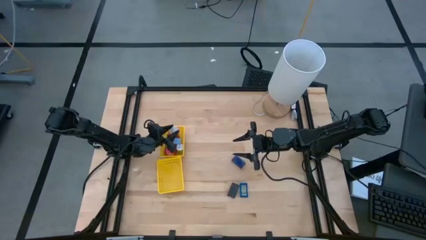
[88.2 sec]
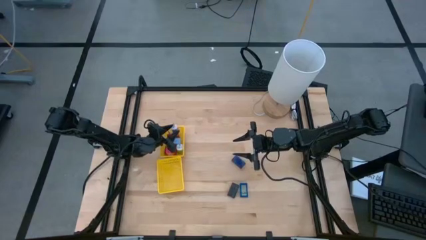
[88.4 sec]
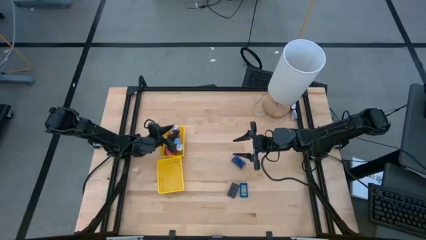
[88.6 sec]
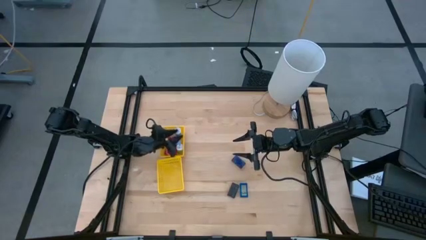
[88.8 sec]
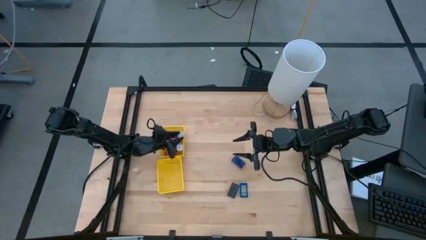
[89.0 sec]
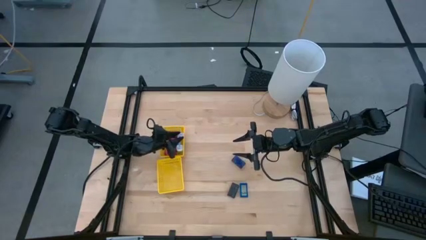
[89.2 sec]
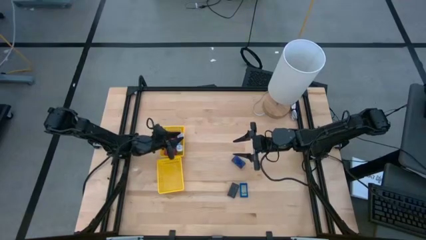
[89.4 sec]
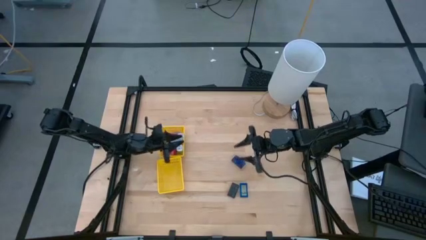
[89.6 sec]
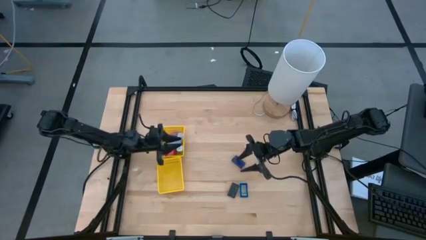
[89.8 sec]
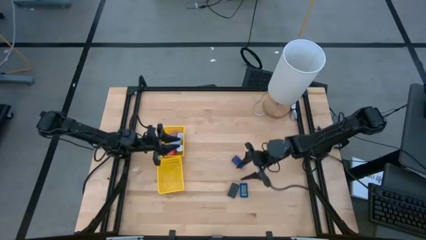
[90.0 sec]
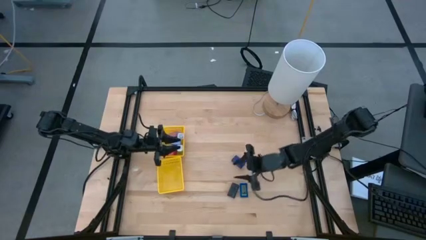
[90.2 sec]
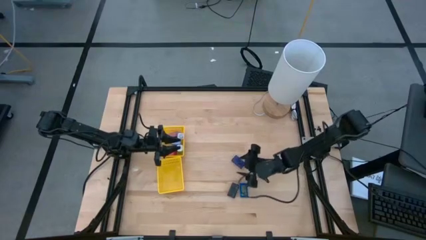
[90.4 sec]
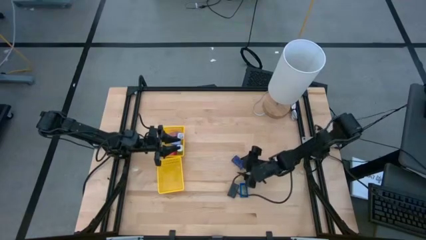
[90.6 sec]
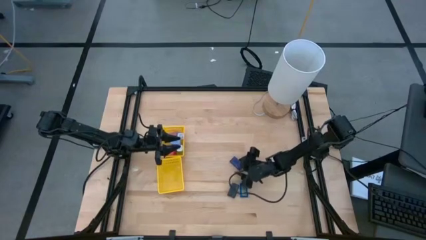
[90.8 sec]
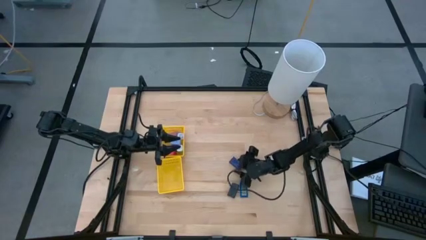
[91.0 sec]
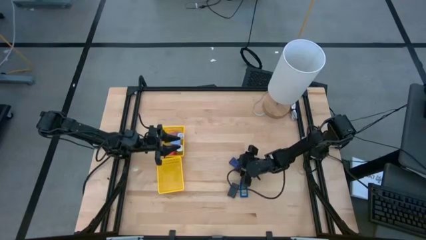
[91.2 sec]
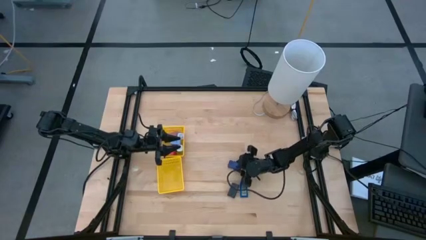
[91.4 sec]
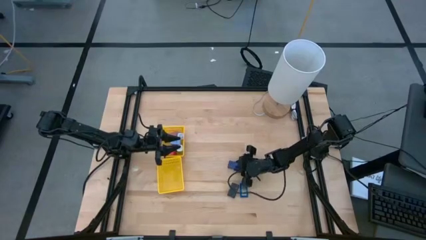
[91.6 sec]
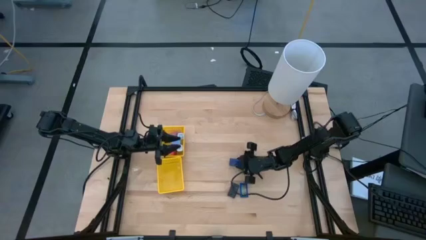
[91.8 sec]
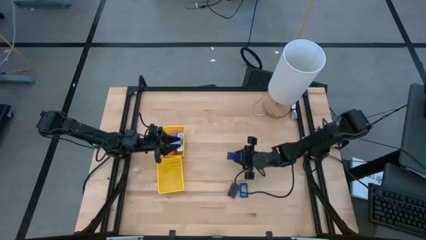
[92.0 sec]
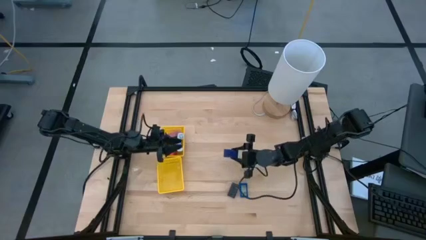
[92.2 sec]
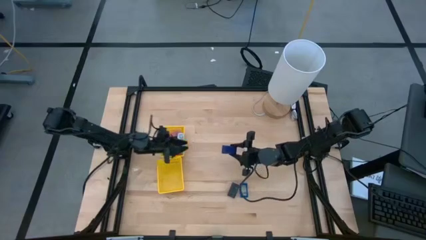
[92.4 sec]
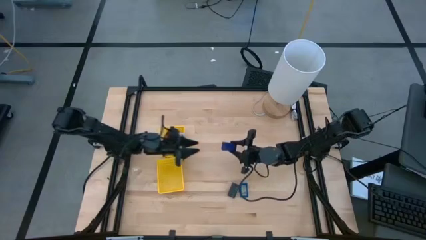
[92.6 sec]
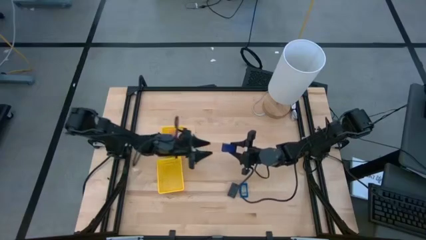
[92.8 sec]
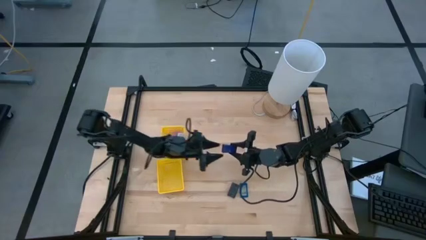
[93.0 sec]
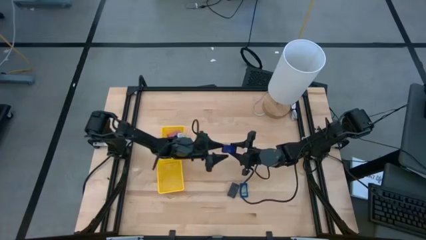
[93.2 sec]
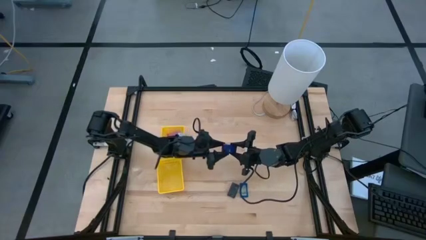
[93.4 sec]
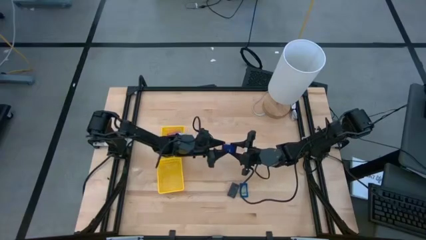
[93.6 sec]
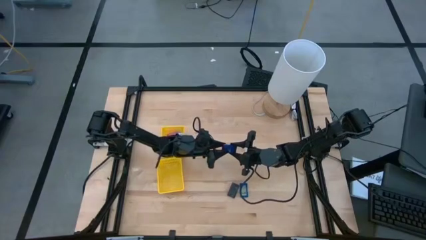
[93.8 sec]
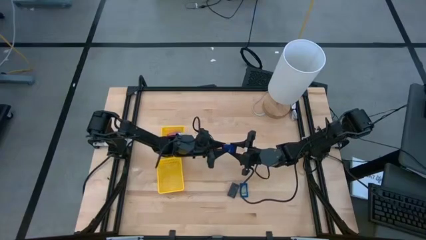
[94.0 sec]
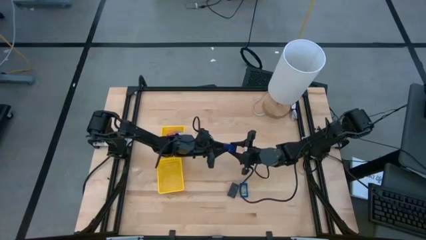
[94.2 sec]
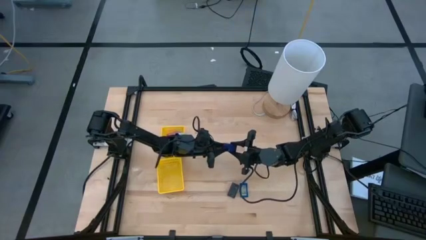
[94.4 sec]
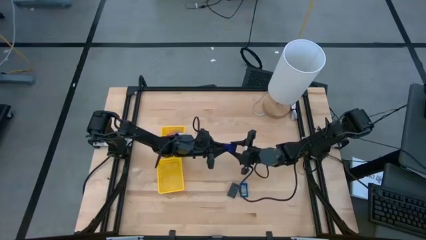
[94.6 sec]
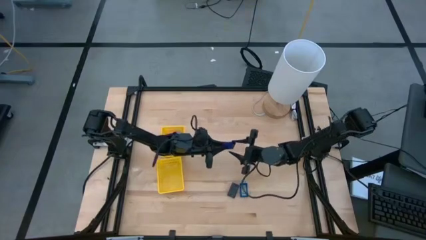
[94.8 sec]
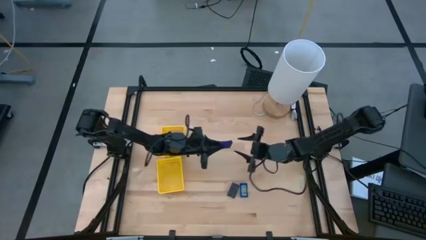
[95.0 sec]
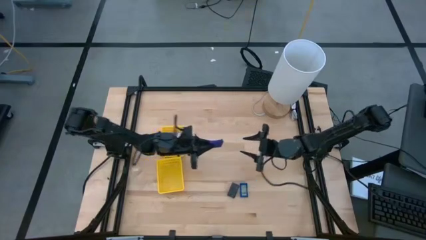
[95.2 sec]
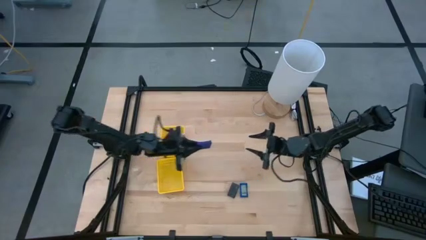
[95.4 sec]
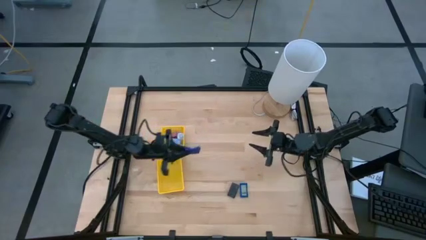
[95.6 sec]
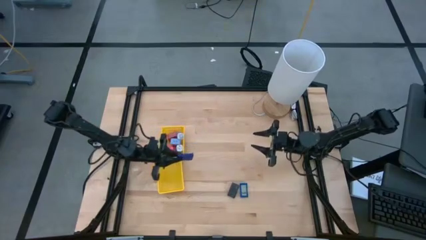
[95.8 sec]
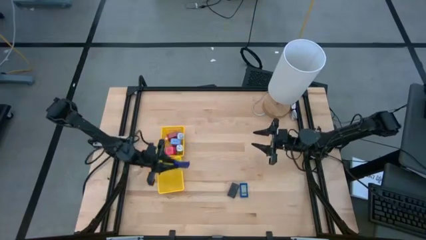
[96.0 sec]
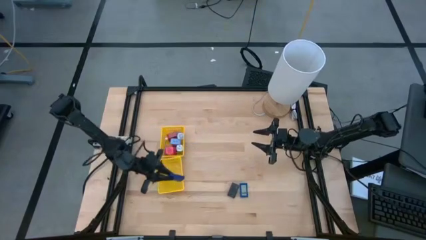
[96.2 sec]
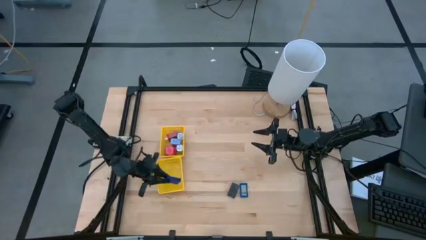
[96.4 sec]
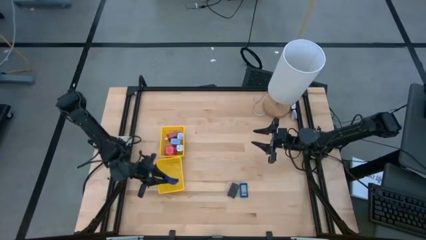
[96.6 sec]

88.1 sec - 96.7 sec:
Task: Pick & Place Office items
Put the top blue digital timer into the bottom yellow bin
